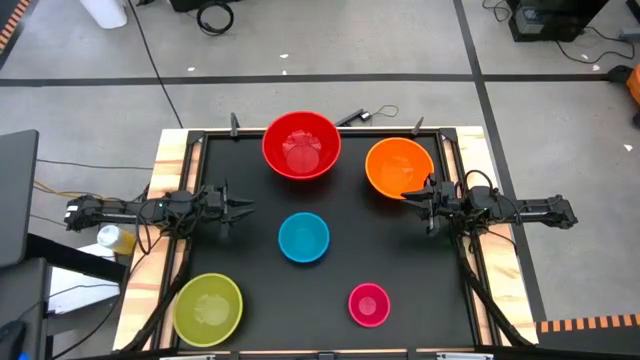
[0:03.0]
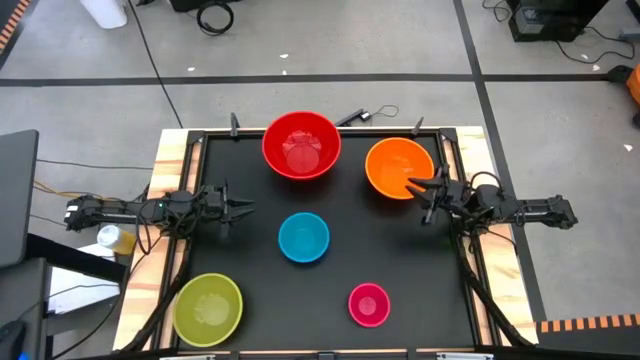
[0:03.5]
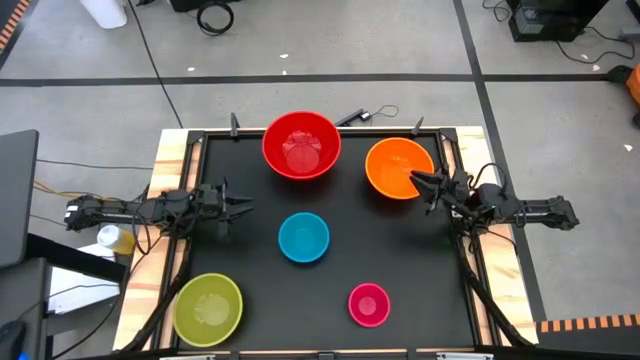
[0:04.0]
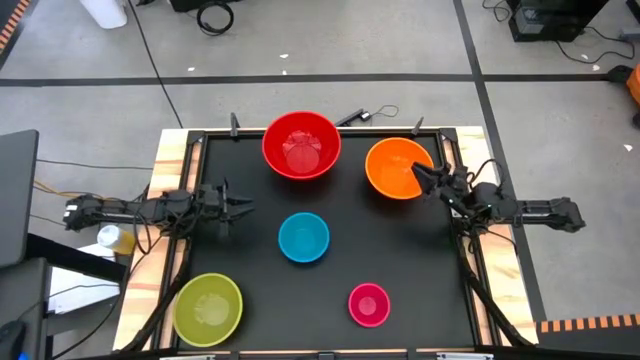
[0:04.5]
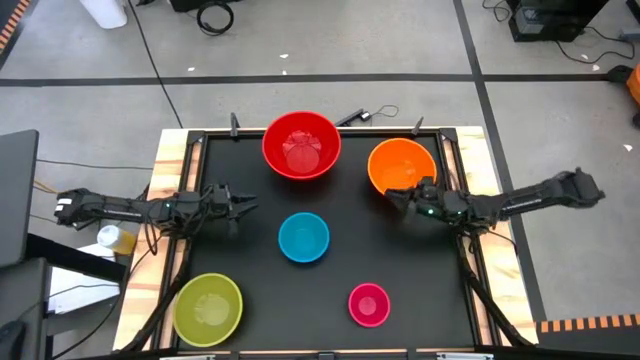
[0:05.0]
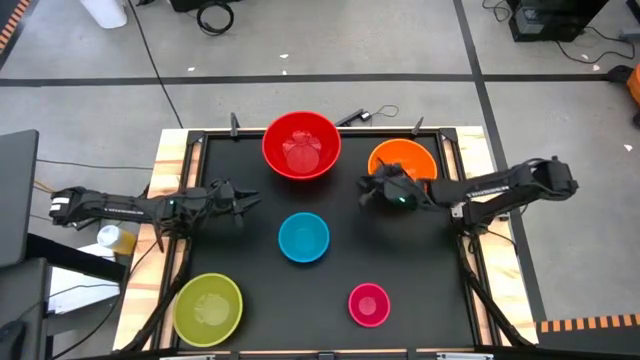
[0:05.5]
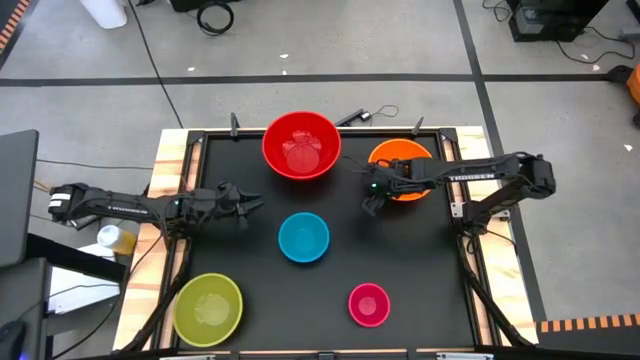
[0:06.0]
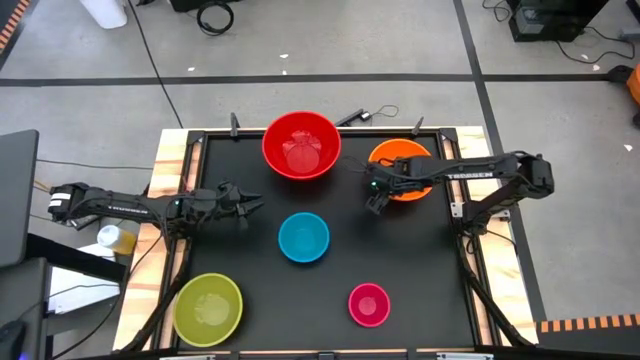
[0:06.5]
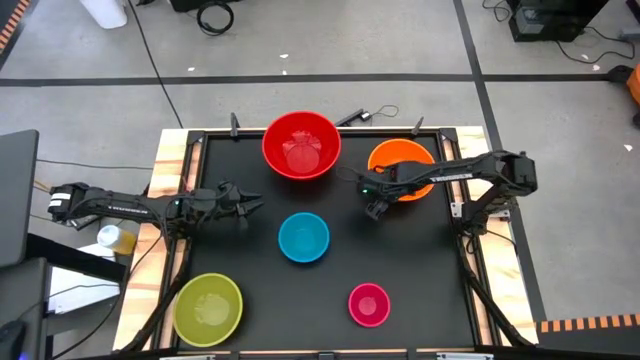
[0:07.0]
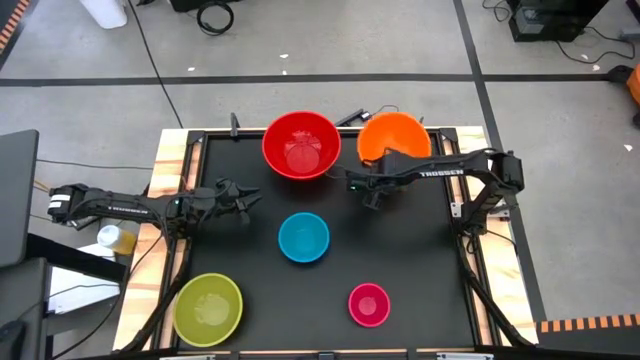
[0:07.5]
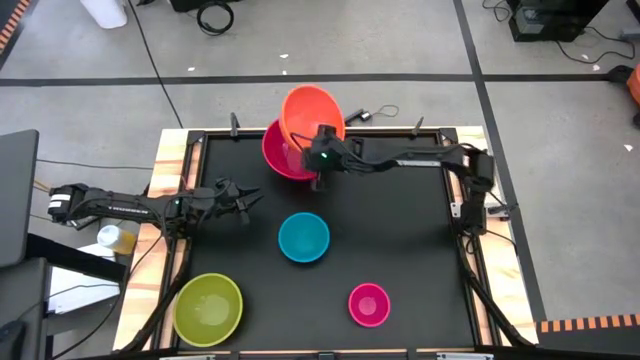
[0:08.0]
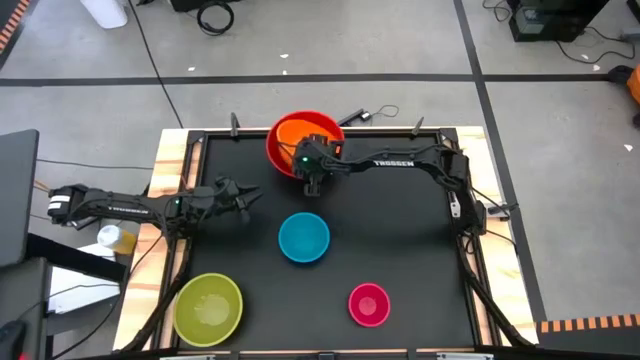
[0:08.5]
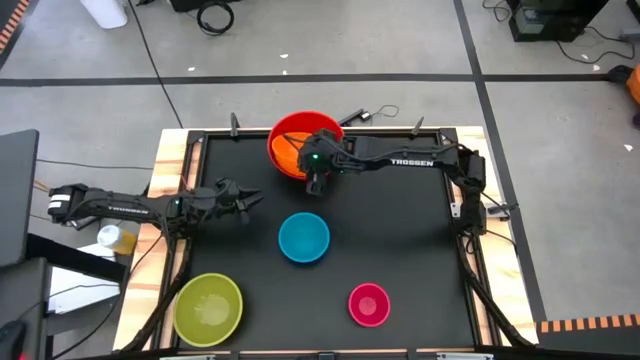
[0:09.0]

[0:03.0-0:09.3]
Stack the orange bowl on top of the red bowl

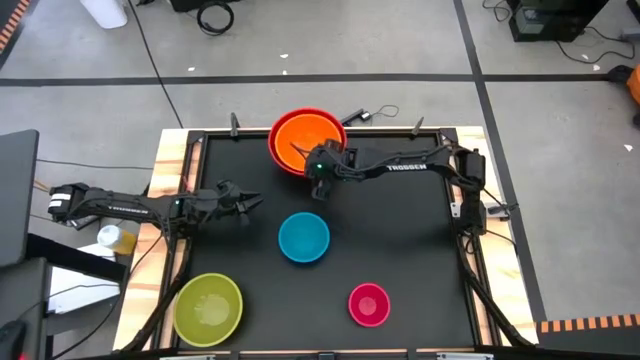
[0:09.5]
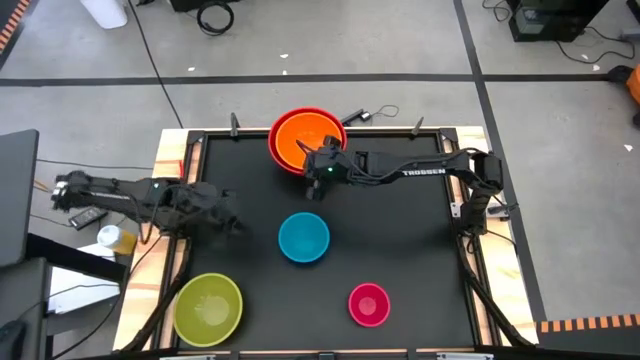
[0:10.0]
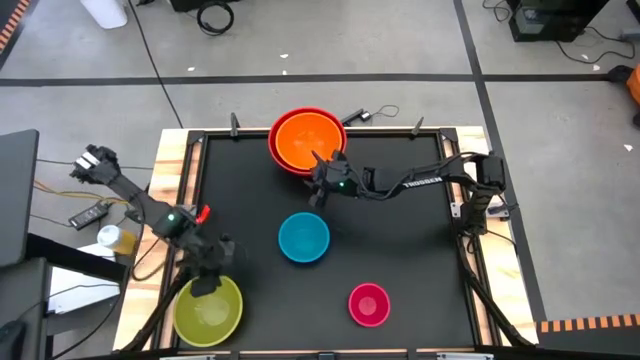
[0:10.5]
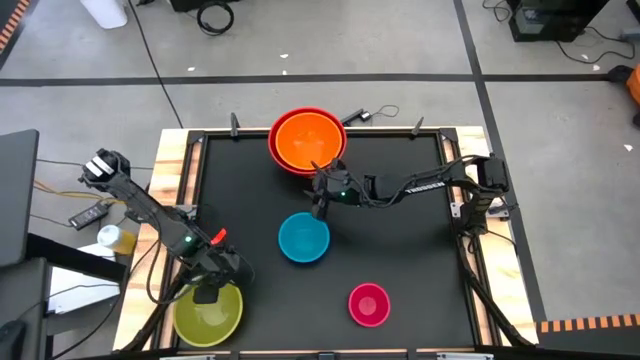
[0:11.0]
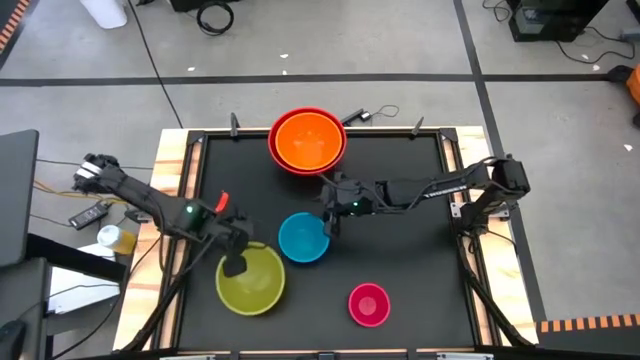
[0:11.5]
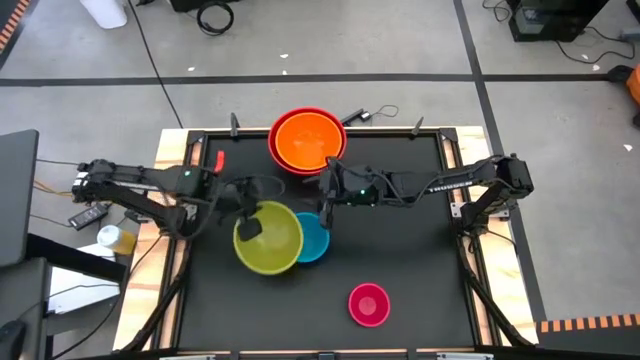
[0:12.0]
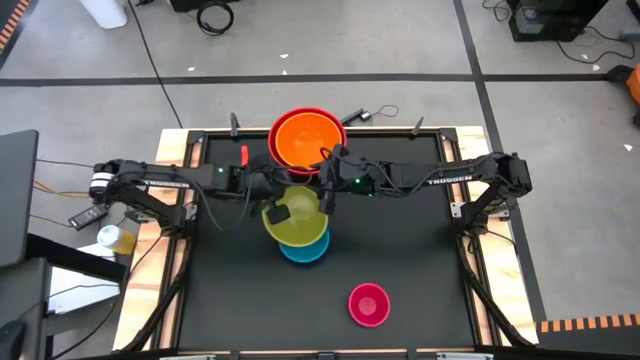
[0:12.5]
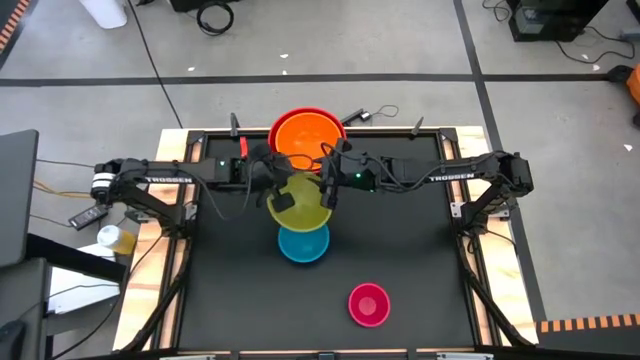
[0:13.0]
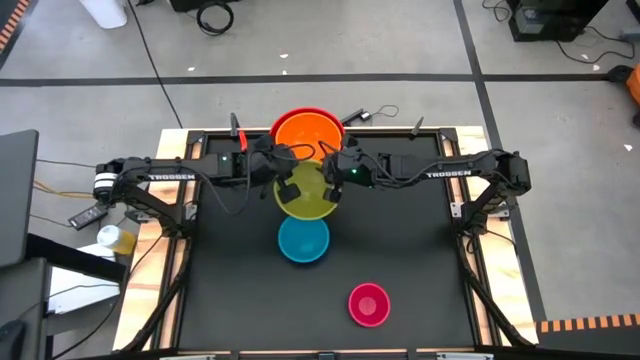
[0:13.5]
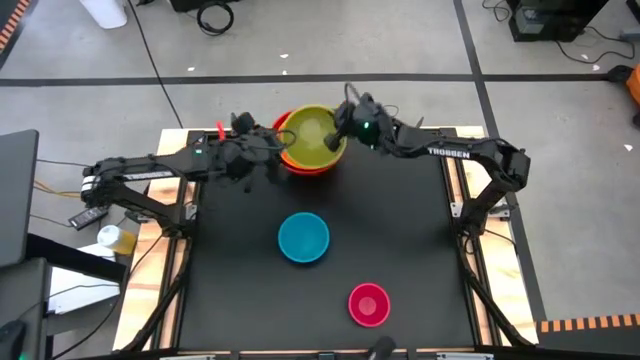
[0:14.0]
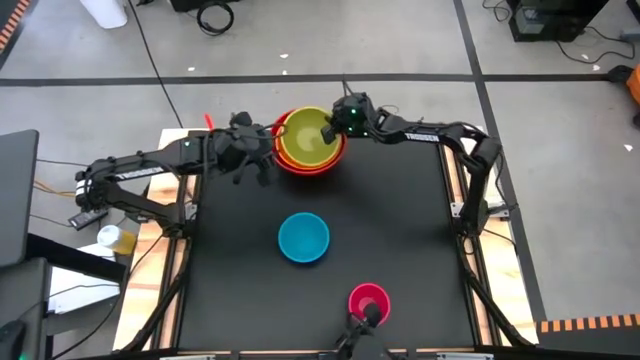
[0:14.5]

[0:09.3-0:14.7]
Stack the green bowl on top of the orange bowl

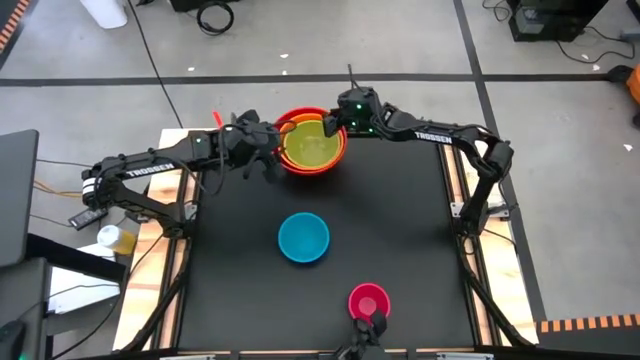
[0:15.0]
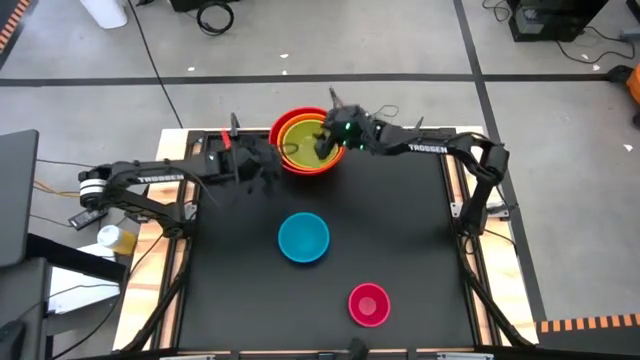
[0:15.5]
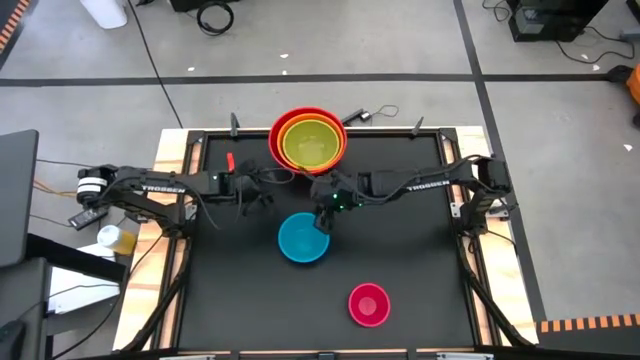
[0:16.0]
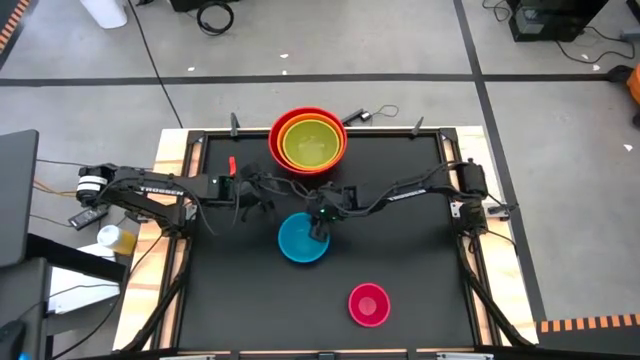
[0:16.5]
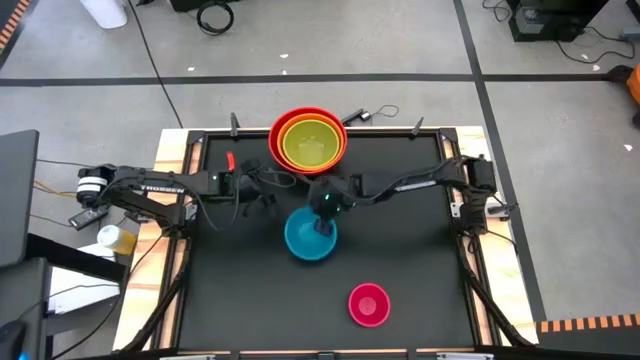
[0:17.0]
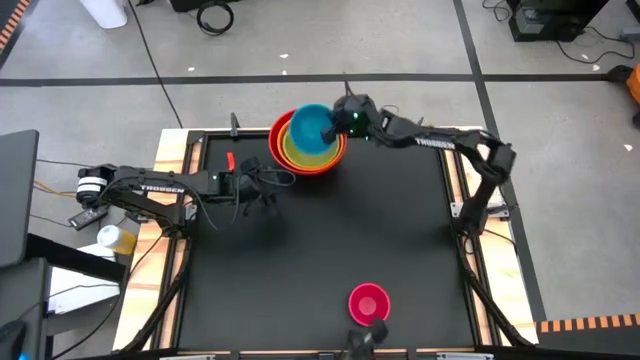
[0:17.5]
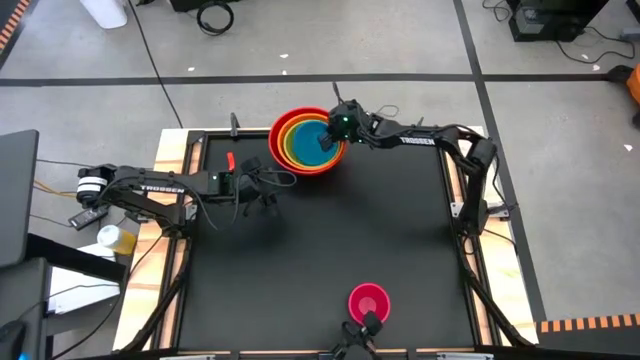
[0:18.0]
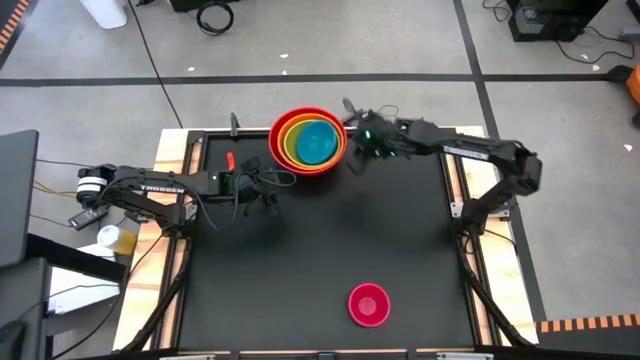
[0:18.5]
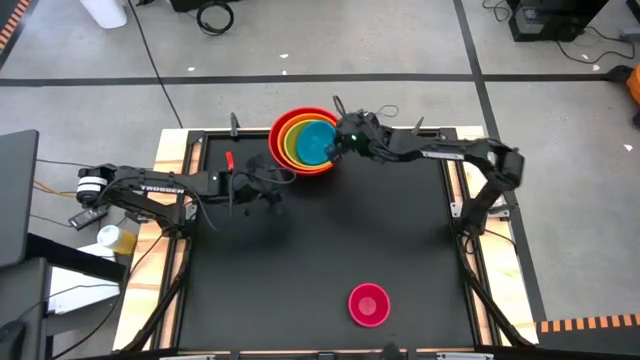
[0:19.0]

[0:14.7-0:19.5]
Stack the blue bowl on top of the green bowl

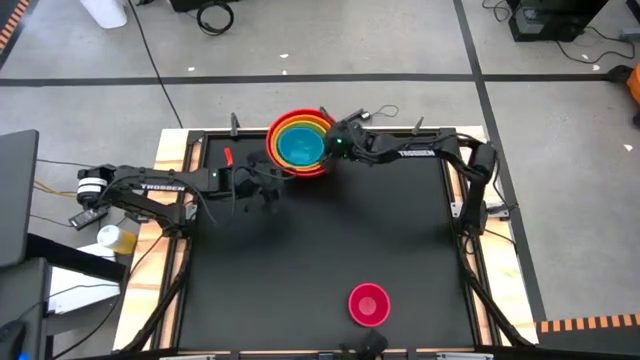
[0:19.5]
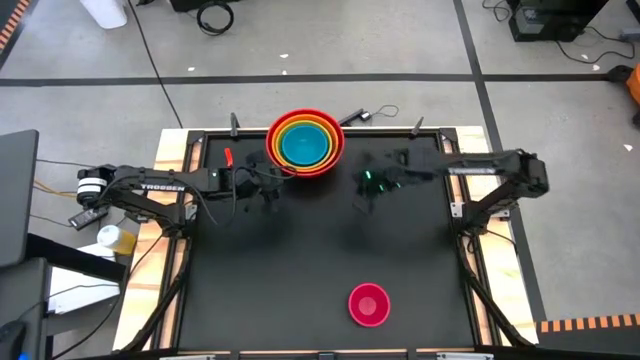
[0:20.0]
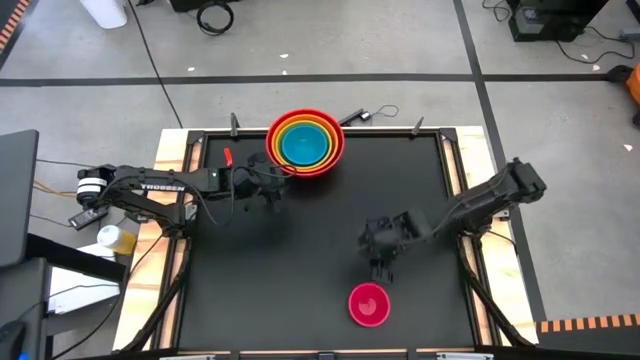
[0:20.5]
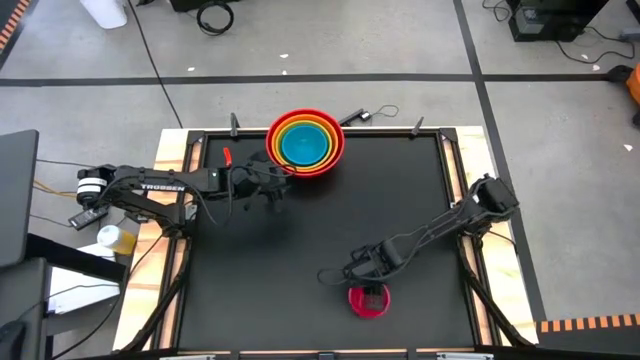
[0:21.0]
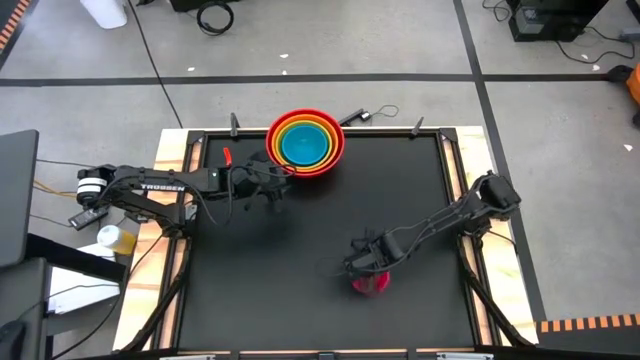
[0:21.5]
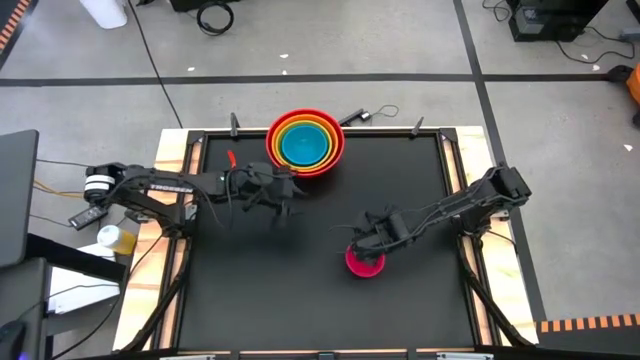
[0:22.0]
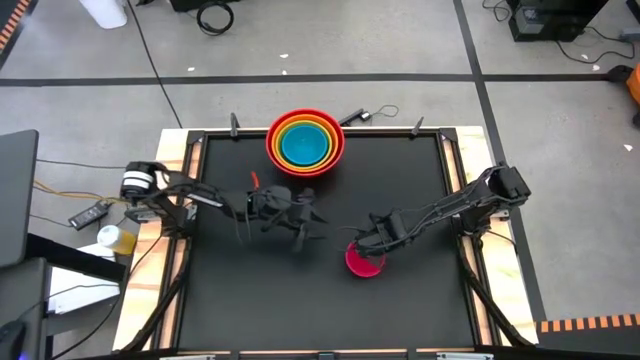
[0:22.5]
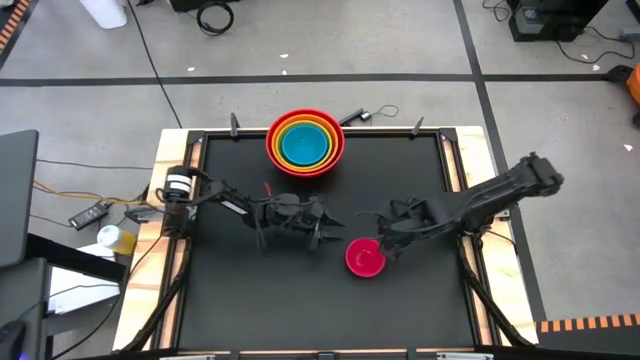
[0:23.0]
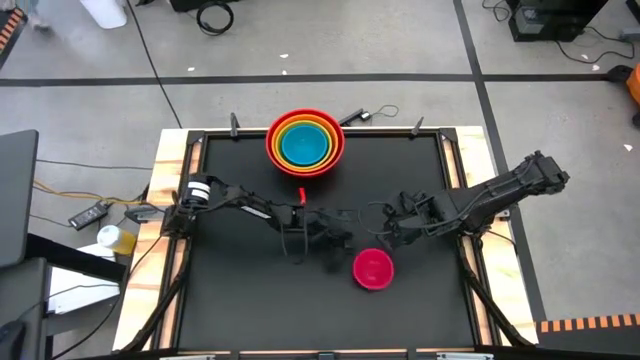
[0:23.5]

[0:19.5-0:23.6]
Stack the pink bowl on top of the blue bowl

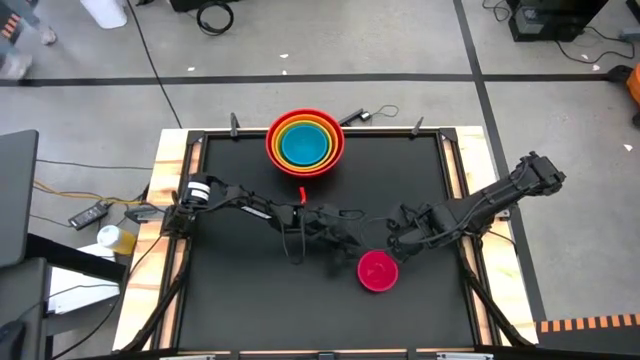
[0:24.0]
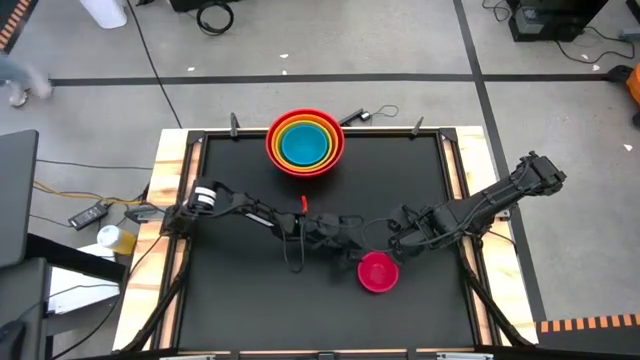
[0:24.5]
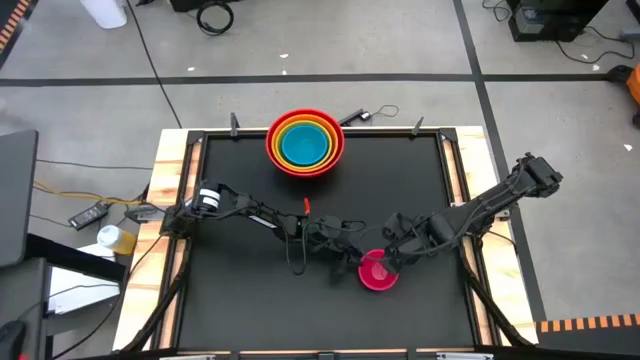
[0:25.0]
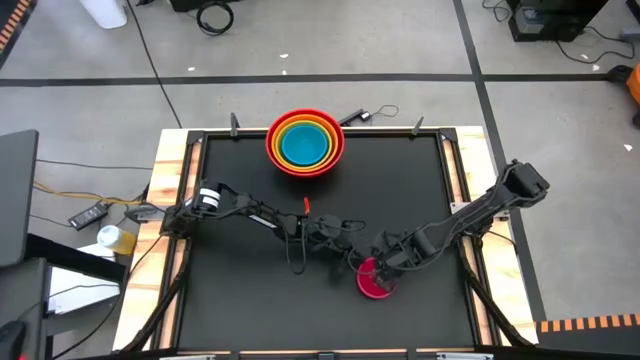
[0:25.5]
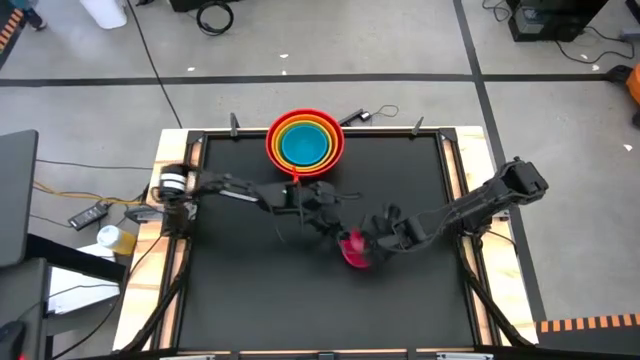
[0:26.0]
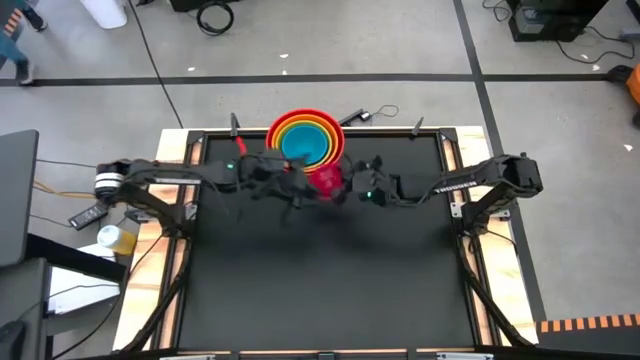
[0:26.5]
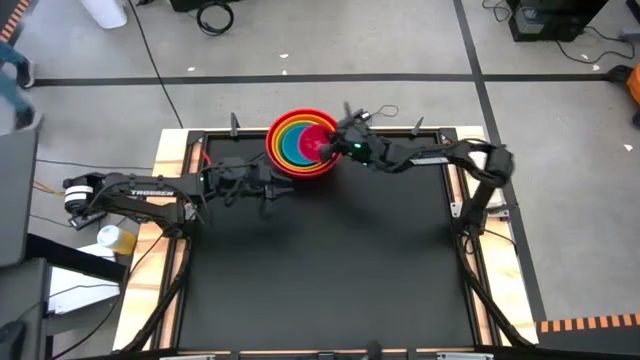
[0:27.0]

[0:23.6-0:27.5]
Stack the pink bowl on top of the blue bowl
